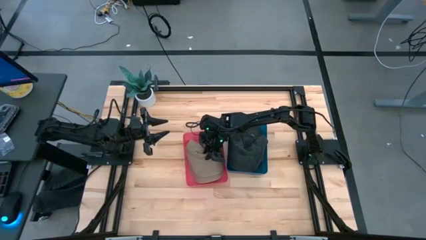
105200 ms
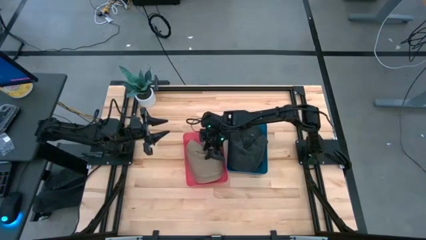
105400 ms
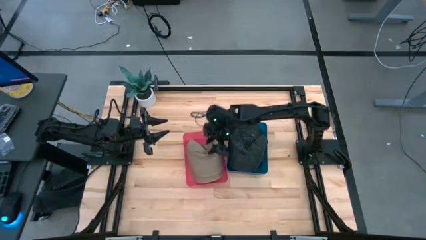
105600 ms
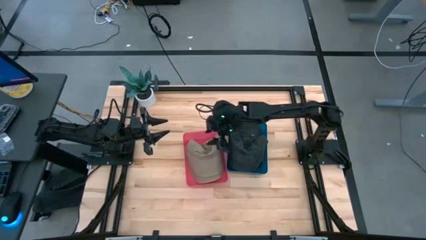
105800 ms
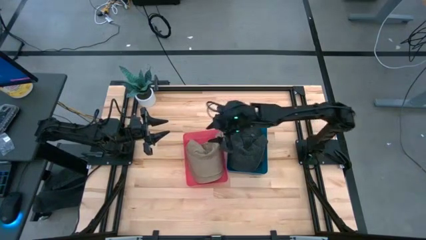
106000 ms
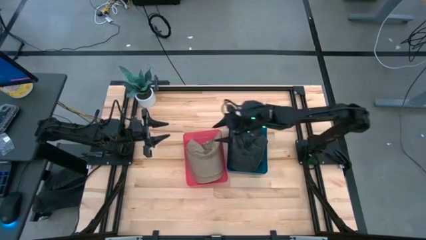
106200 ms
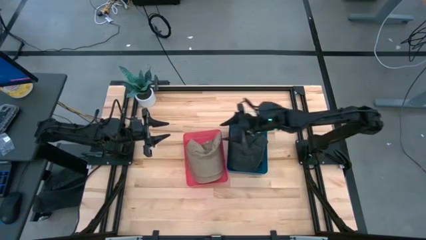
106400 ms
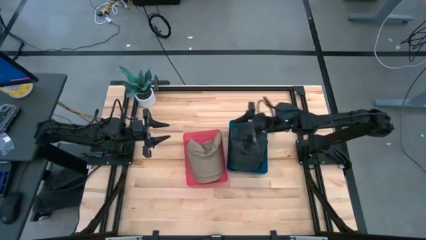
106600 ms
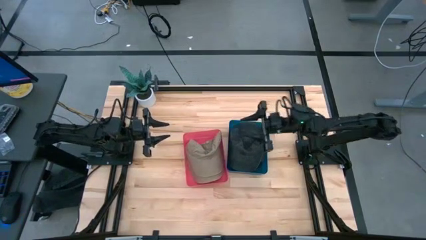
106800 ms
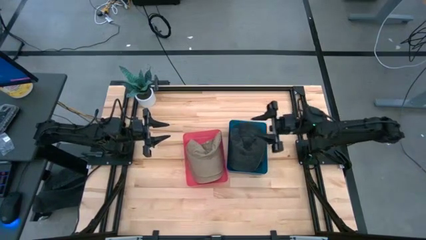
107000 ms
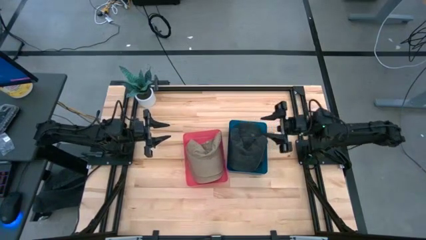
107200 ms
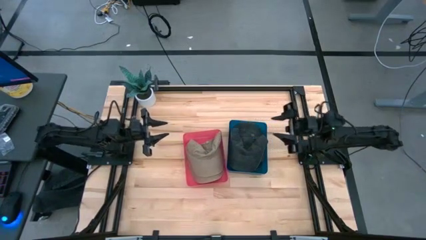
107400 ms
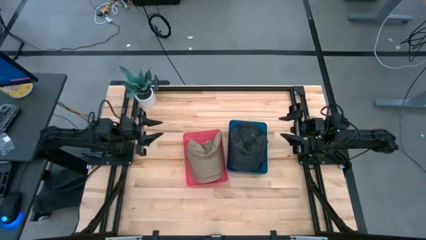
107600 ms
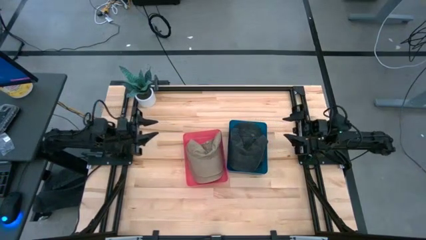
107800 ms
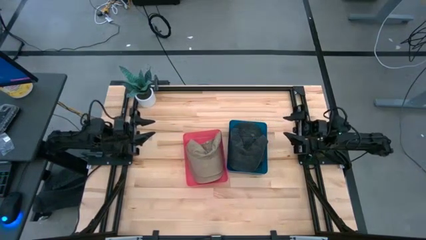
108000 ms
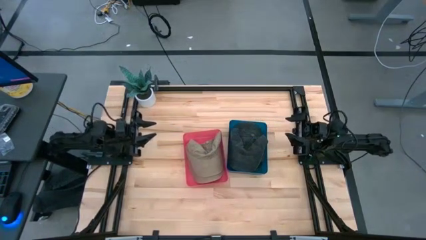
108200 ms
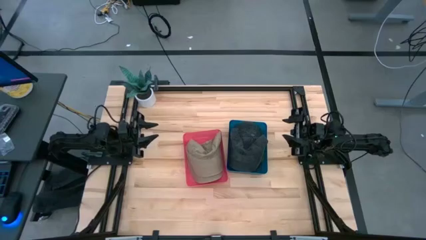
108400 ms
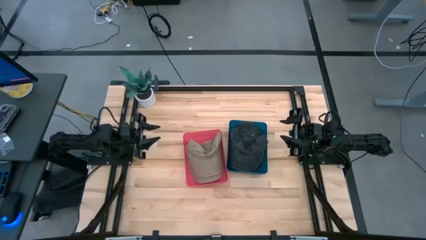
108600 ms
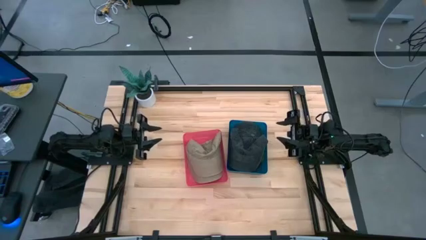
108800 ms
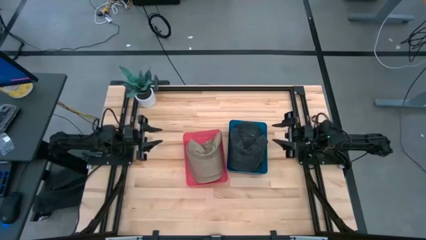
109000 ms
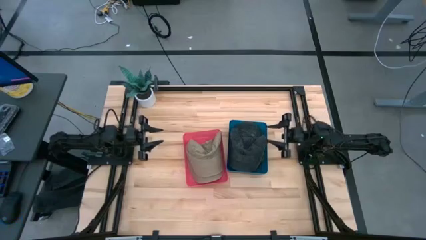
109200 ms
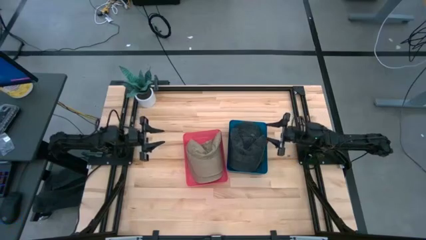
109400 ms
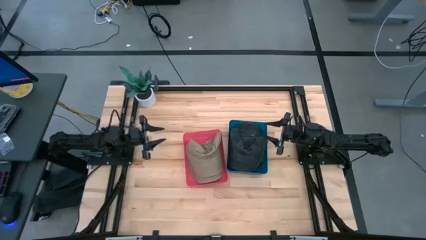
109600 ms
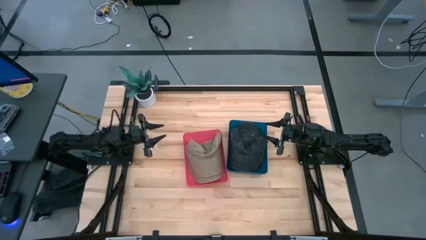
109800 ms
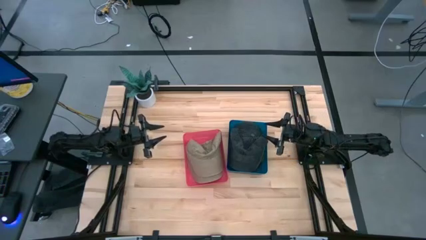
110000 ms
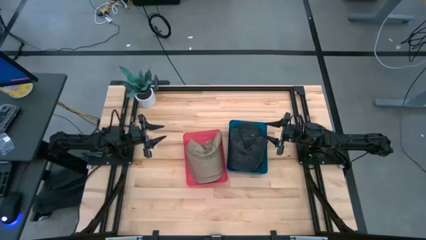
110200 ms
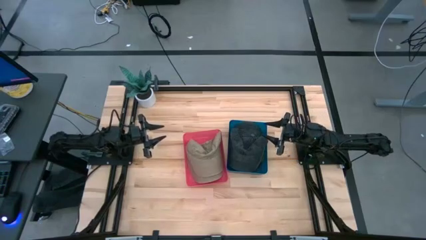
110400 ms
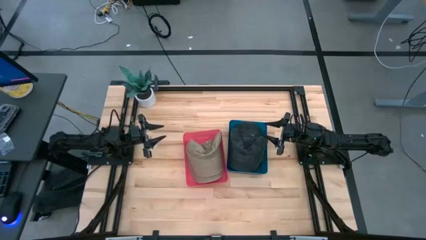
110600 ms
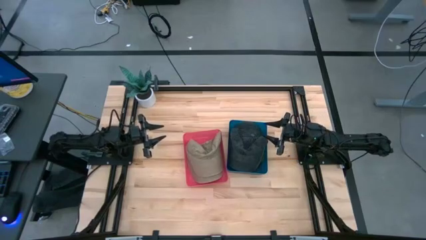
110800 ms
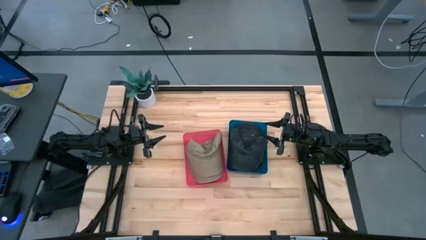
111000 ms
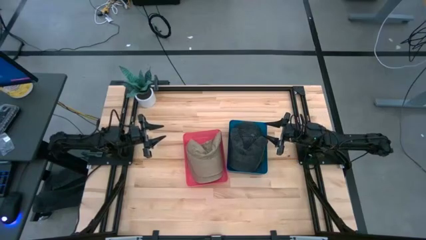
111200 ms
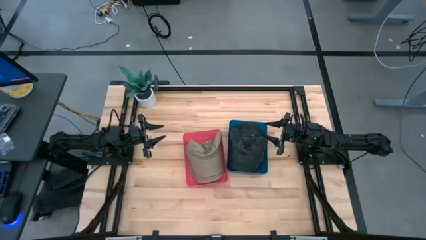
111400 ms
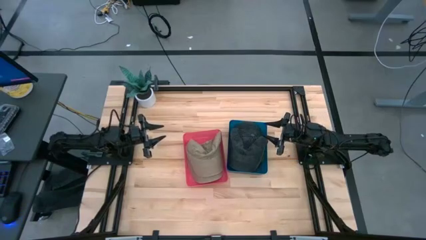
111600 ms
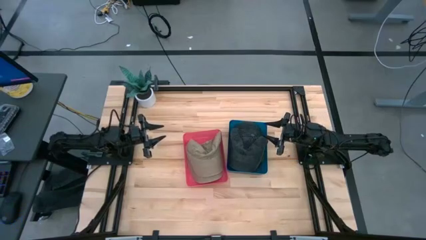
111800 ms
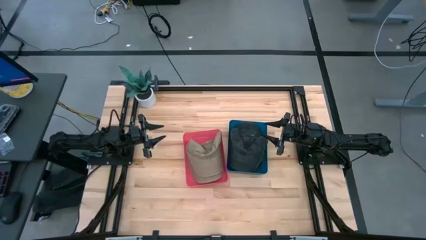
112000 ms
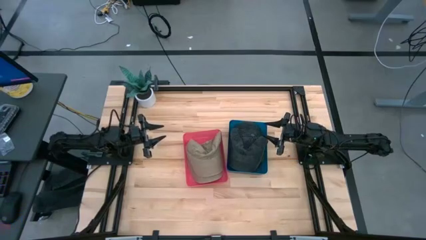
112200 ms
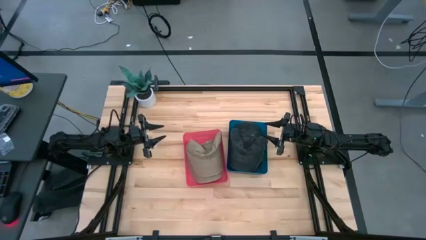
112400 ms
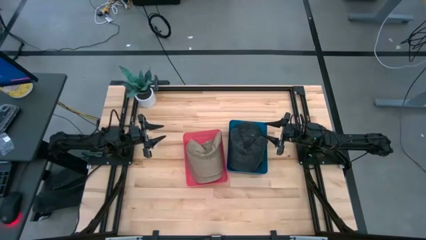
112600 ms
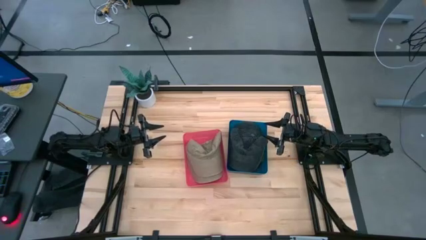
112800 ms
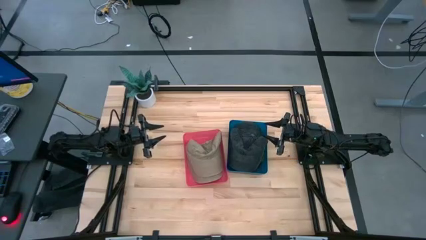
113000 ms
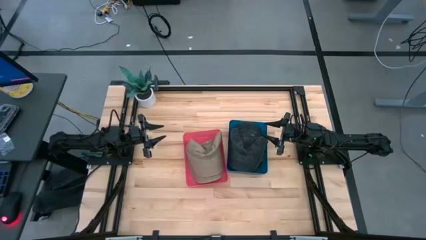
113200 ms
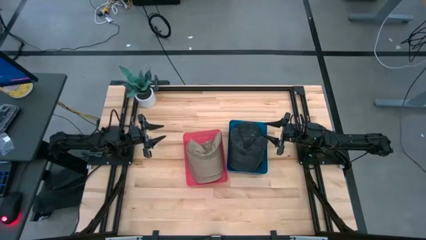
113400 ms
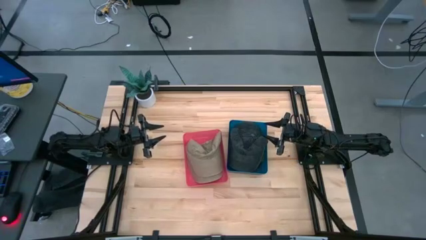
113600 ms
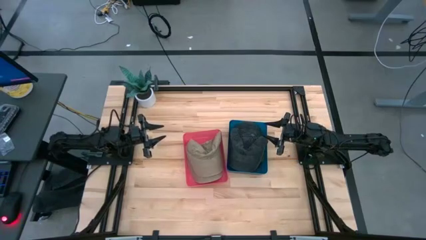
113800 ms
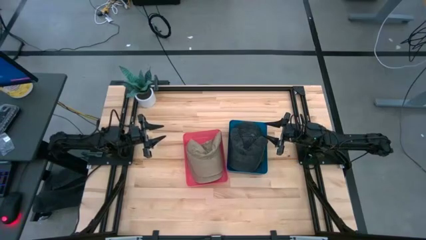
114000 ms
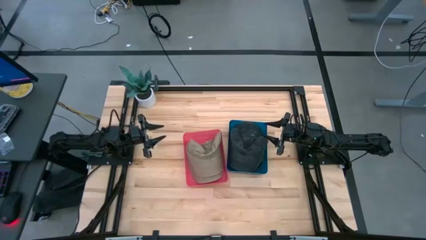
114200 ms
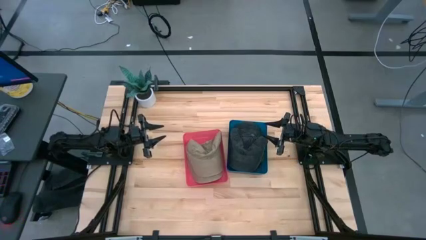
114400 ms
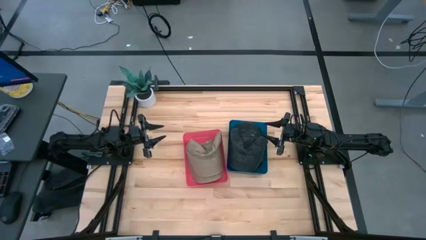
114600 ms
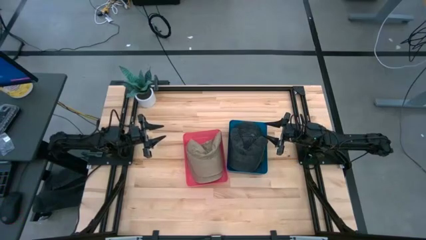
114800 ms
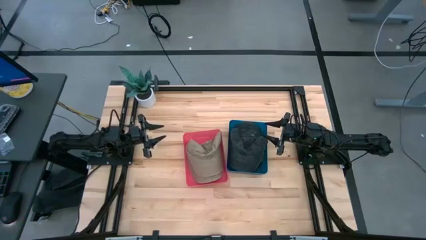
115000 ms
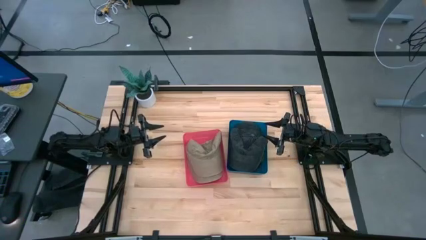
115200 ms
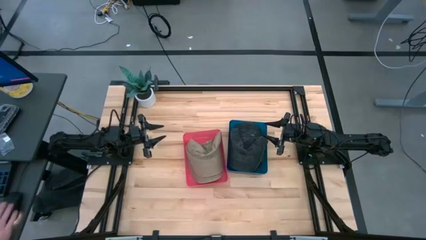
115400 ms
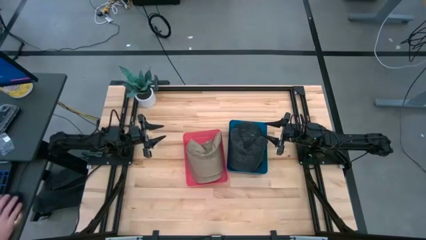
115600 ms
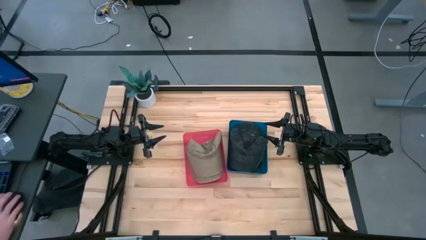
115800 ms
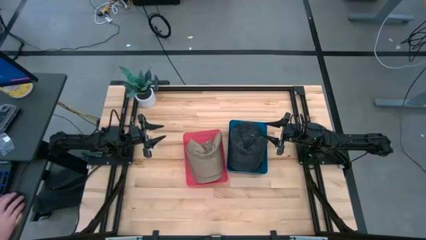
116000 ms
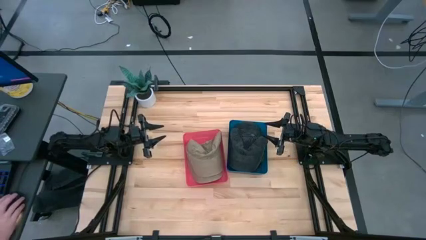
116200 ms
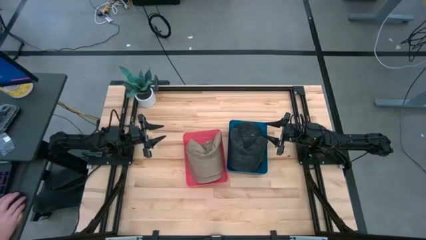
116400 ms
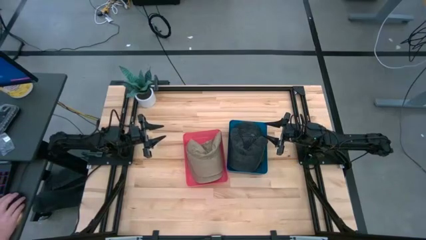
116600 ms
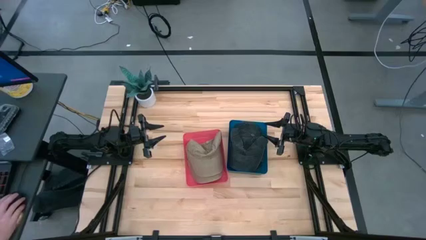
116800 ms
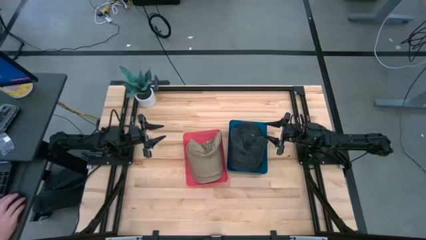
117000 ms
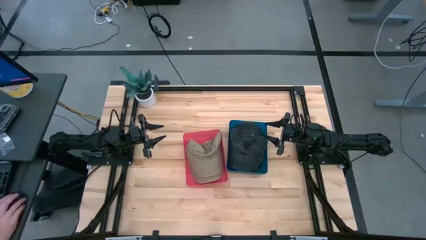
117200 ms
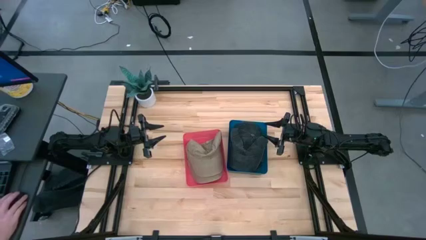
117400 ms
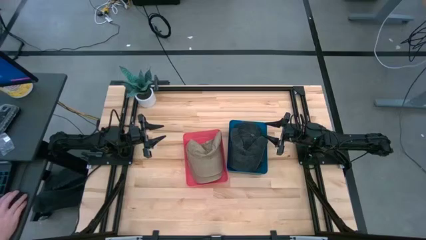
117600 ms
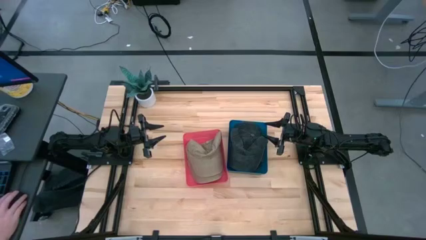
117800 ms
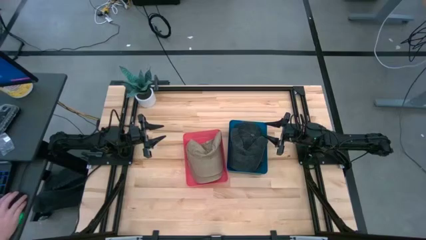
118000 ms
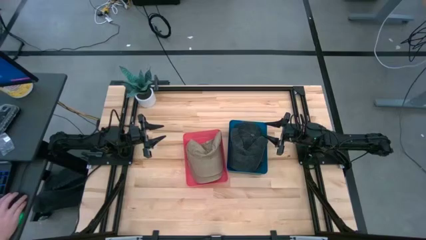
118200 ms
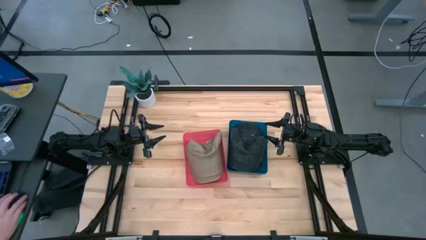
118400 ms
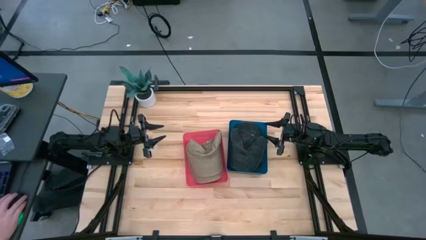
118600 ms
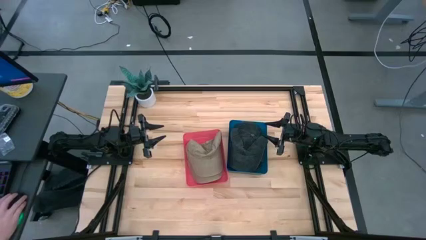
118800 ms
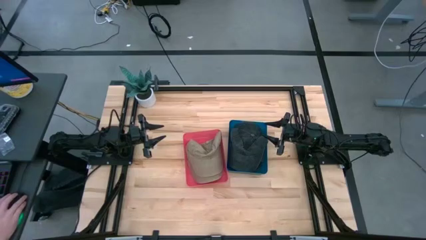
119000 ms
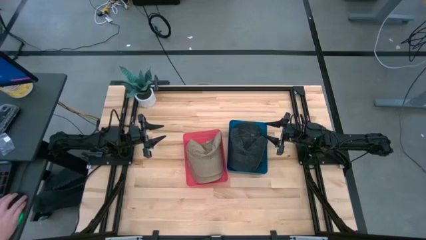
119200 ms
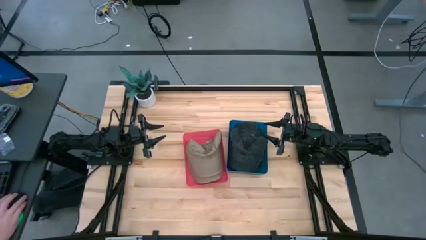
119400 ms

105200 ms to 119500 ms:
Task: Pick & Place hat
Return to Home Position
